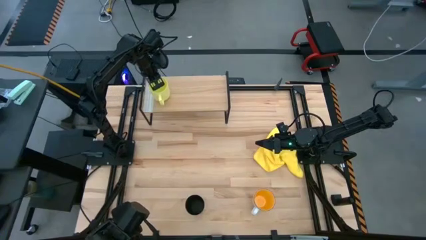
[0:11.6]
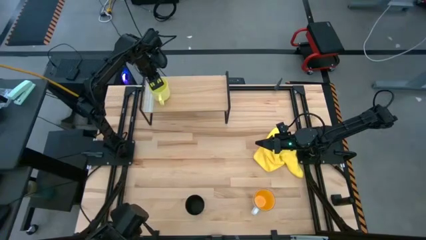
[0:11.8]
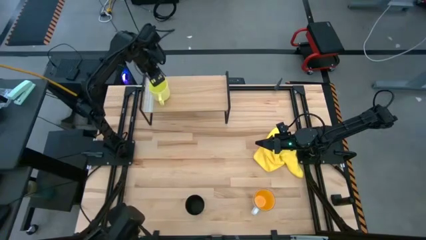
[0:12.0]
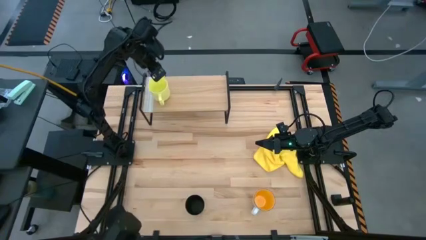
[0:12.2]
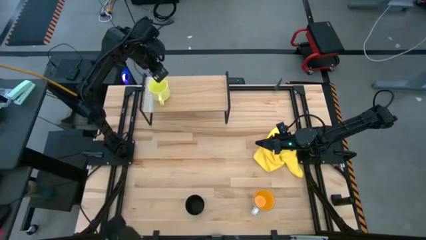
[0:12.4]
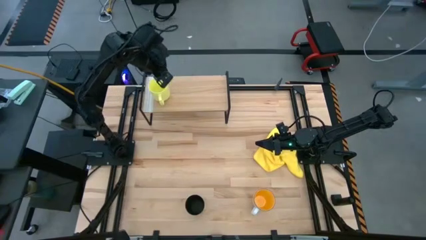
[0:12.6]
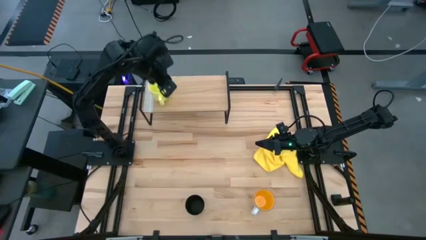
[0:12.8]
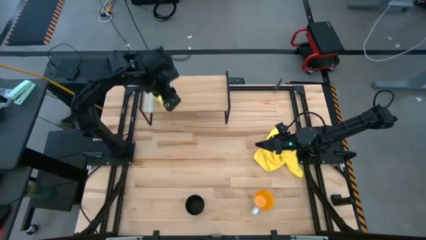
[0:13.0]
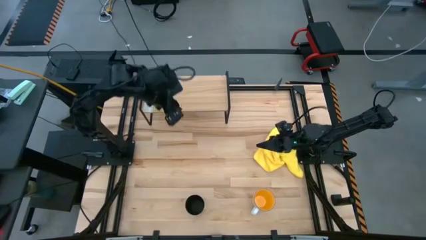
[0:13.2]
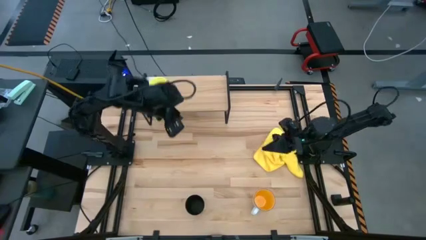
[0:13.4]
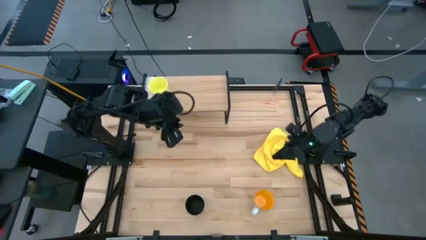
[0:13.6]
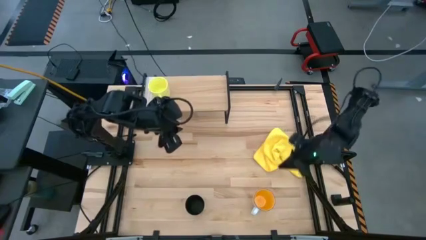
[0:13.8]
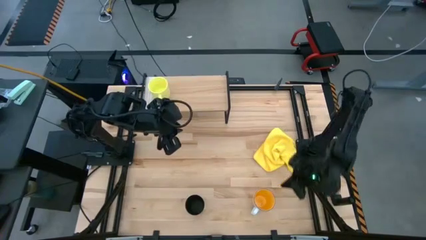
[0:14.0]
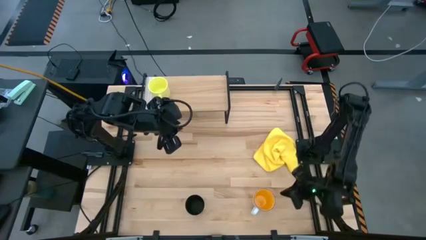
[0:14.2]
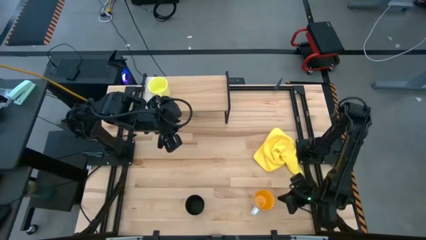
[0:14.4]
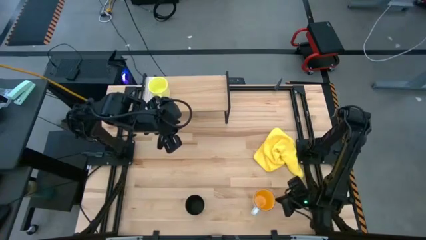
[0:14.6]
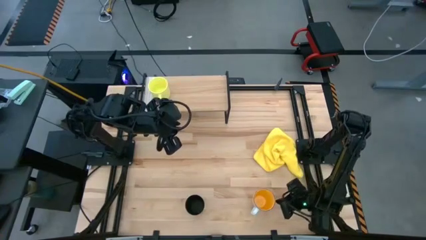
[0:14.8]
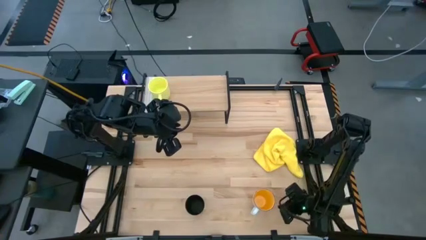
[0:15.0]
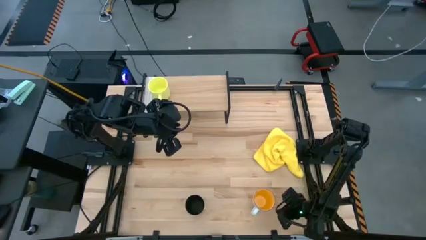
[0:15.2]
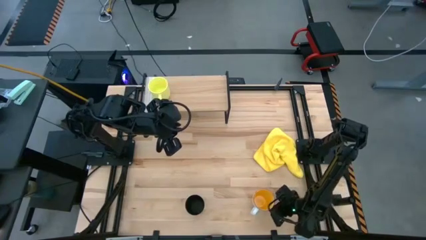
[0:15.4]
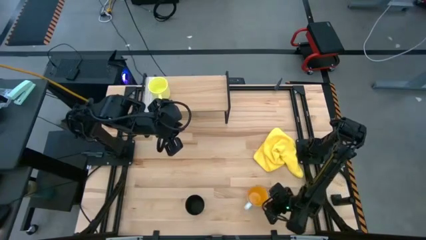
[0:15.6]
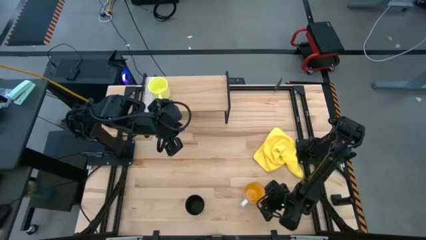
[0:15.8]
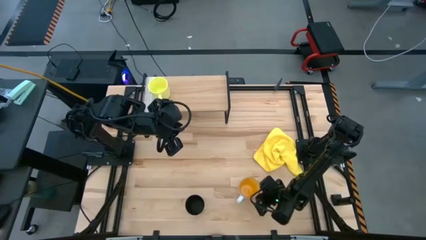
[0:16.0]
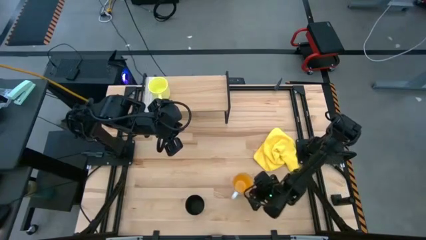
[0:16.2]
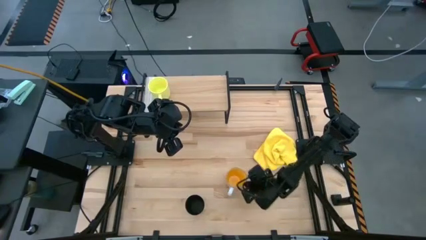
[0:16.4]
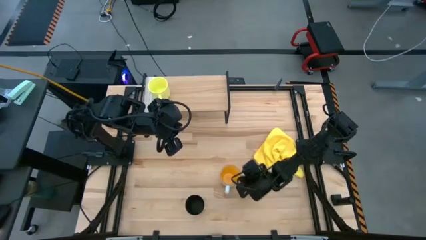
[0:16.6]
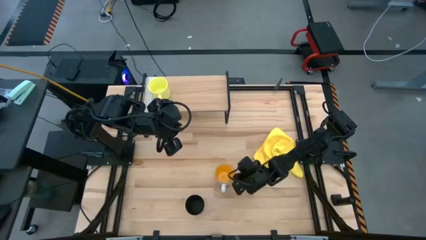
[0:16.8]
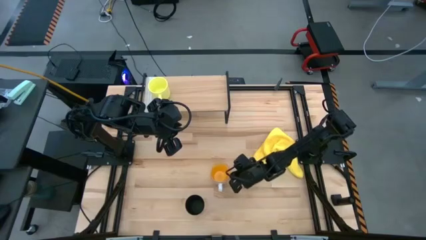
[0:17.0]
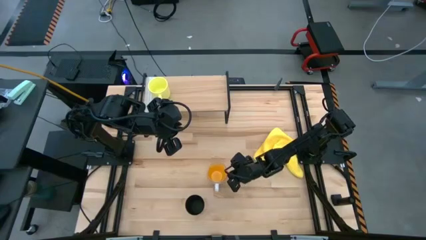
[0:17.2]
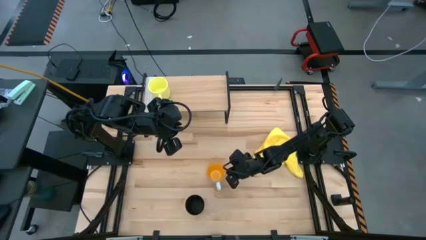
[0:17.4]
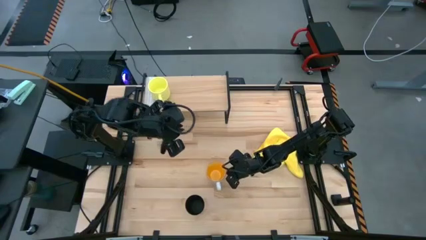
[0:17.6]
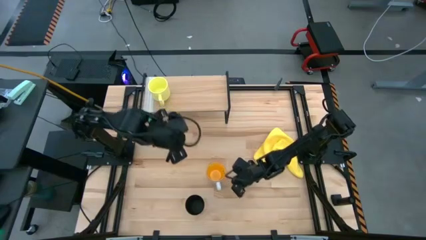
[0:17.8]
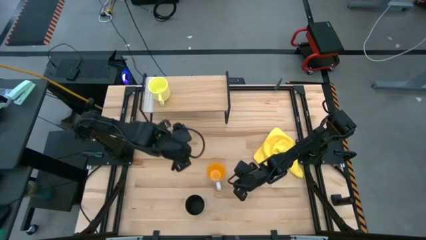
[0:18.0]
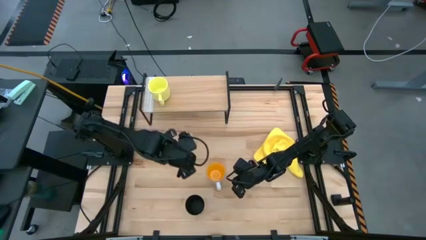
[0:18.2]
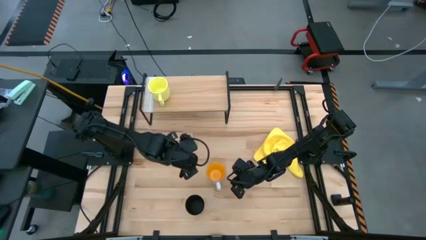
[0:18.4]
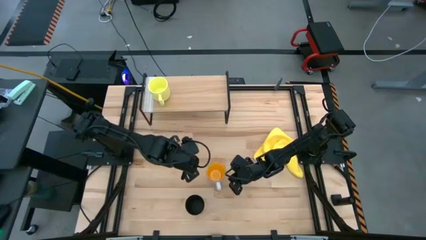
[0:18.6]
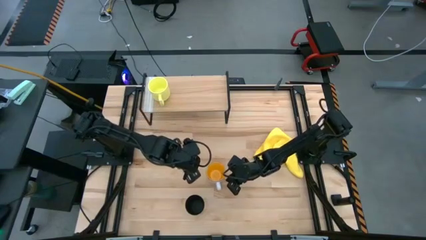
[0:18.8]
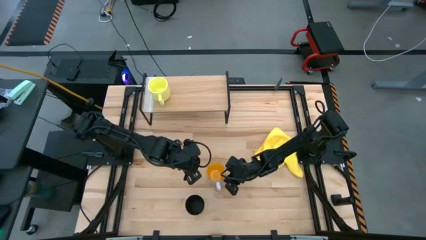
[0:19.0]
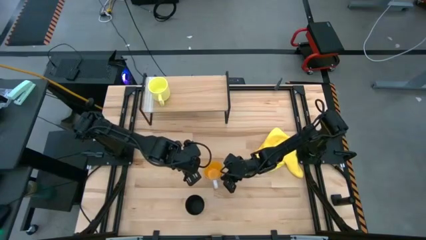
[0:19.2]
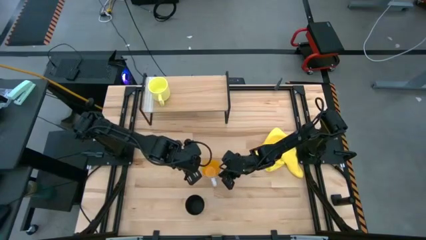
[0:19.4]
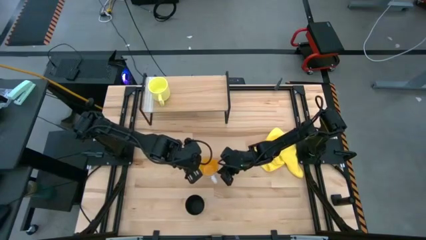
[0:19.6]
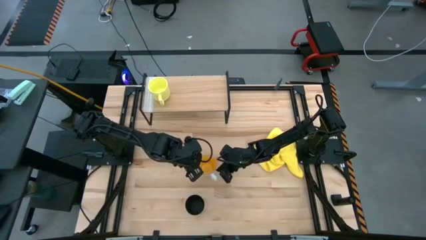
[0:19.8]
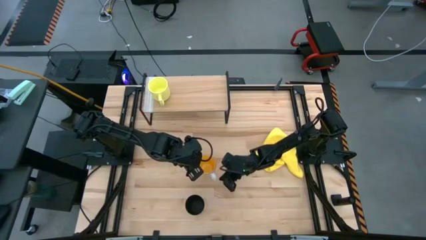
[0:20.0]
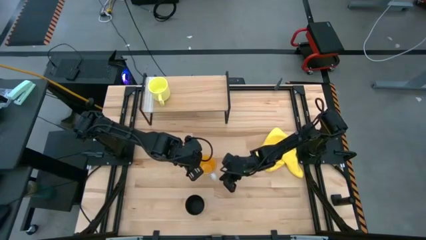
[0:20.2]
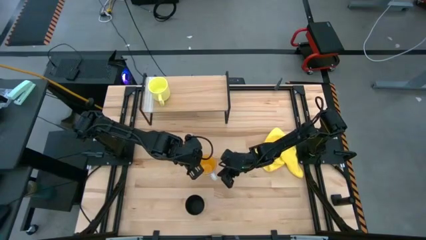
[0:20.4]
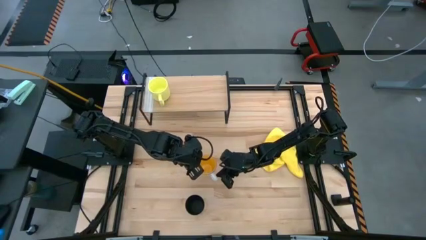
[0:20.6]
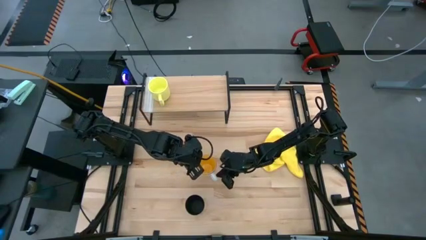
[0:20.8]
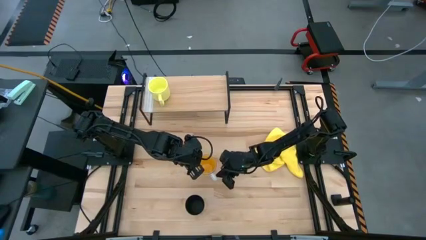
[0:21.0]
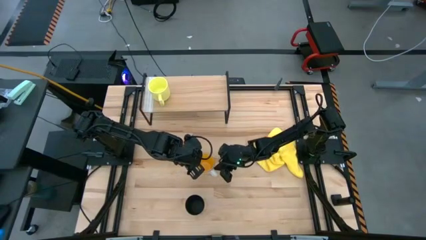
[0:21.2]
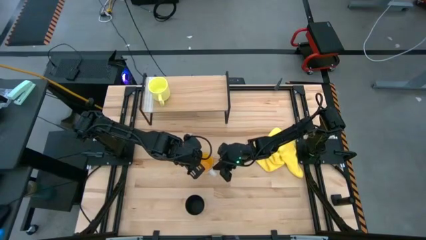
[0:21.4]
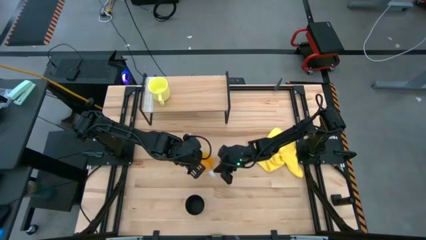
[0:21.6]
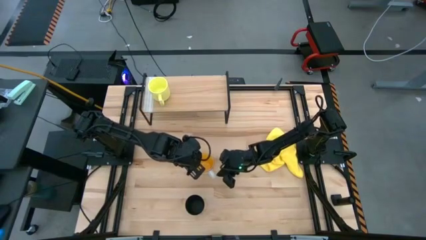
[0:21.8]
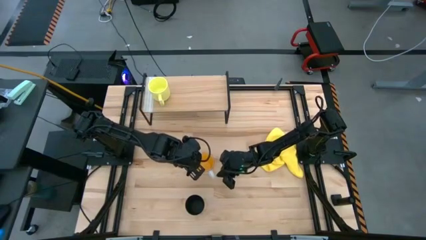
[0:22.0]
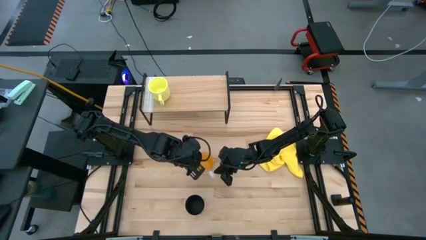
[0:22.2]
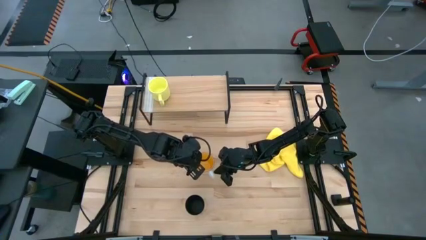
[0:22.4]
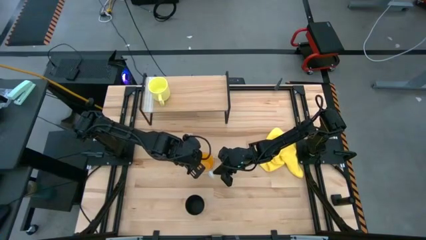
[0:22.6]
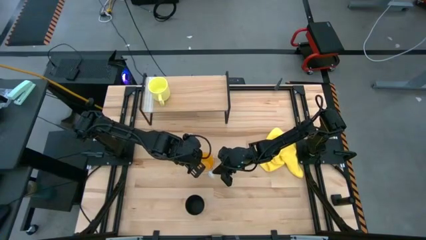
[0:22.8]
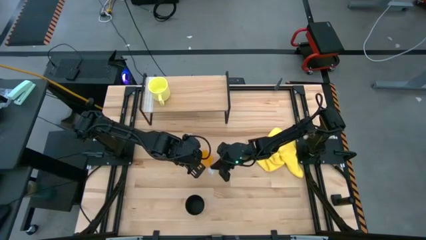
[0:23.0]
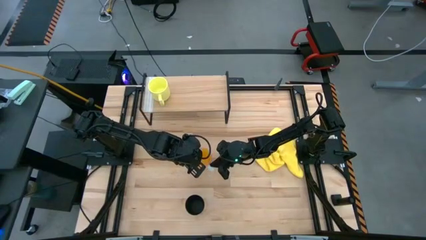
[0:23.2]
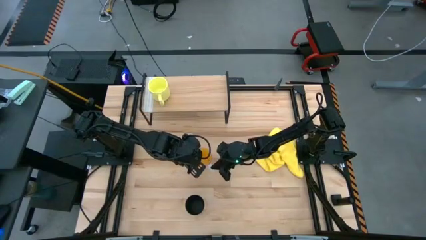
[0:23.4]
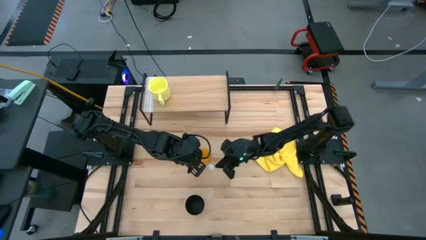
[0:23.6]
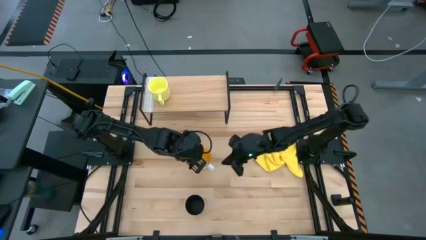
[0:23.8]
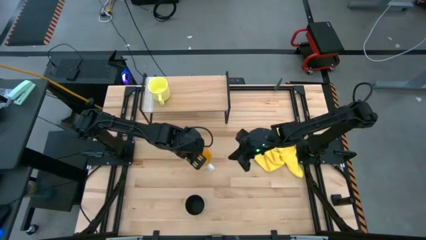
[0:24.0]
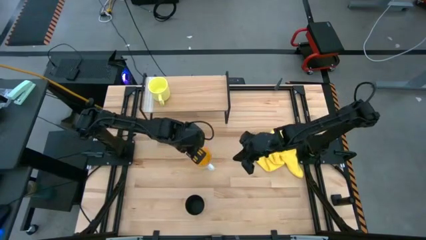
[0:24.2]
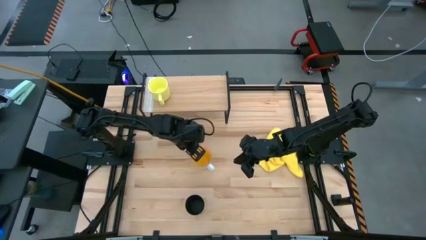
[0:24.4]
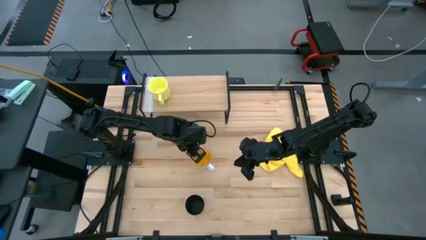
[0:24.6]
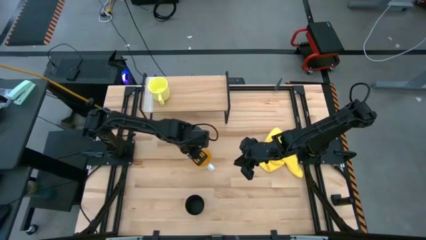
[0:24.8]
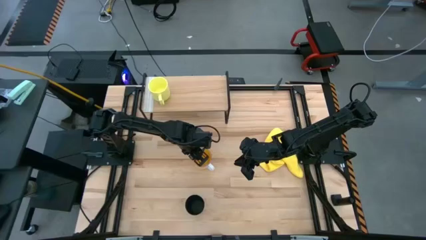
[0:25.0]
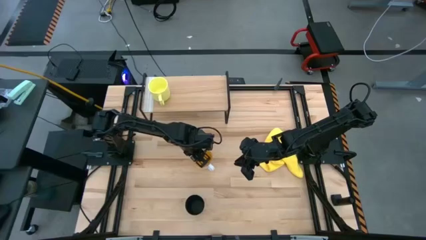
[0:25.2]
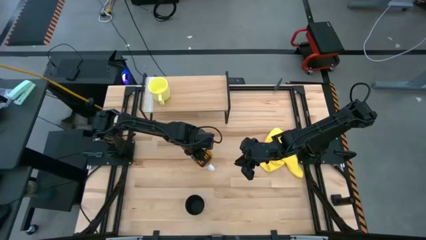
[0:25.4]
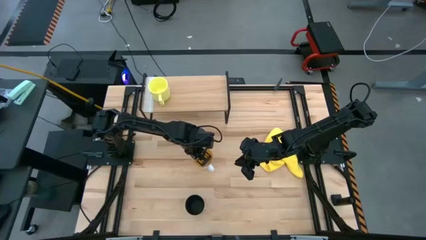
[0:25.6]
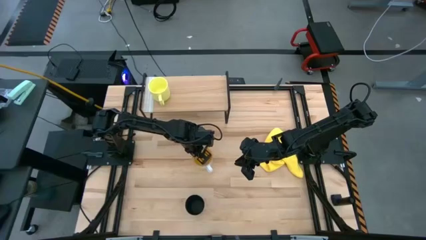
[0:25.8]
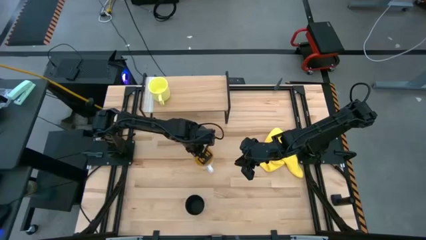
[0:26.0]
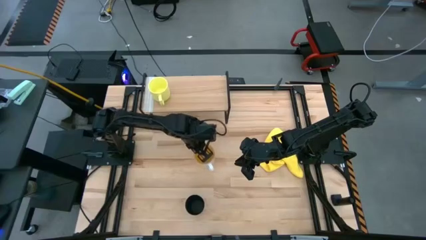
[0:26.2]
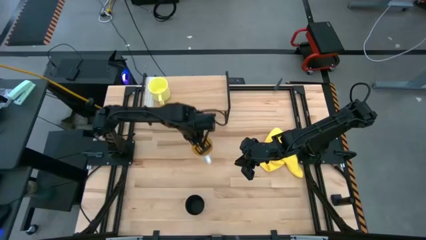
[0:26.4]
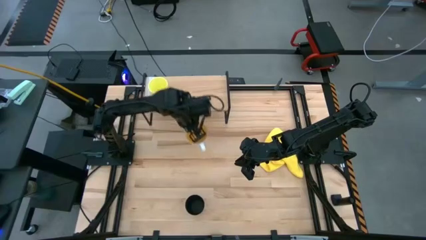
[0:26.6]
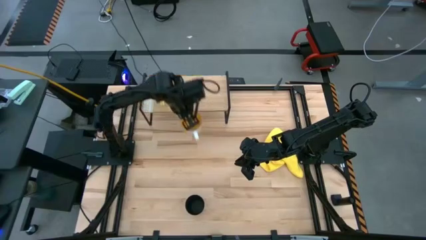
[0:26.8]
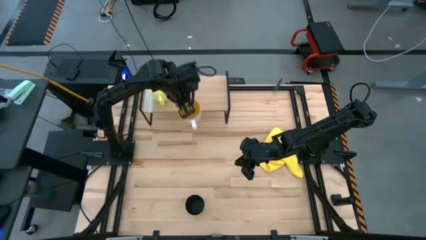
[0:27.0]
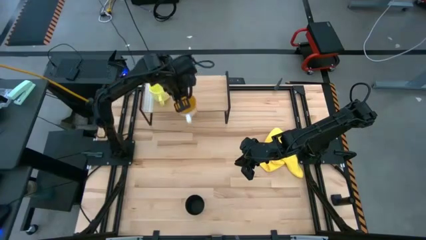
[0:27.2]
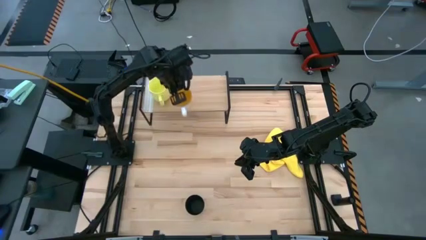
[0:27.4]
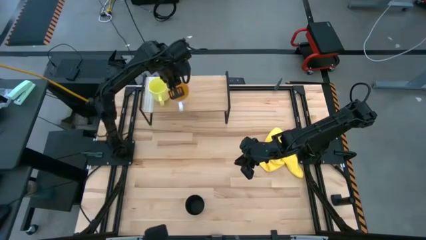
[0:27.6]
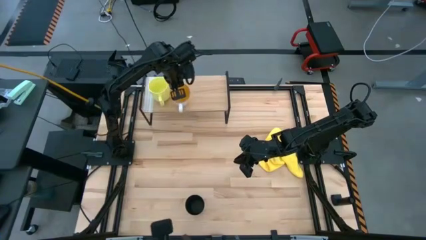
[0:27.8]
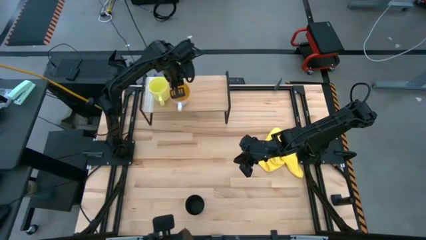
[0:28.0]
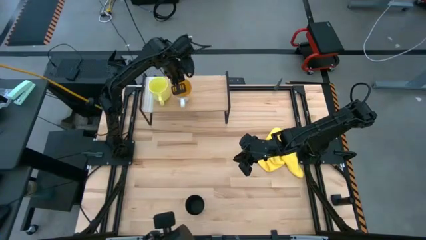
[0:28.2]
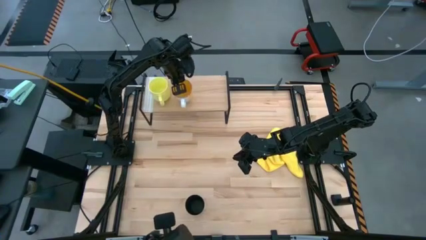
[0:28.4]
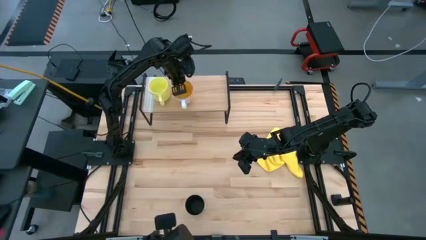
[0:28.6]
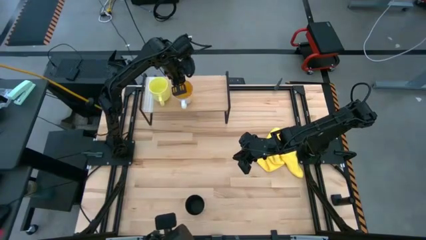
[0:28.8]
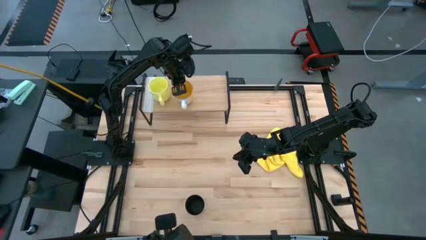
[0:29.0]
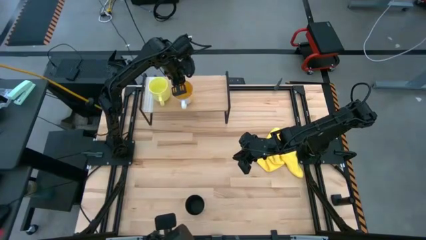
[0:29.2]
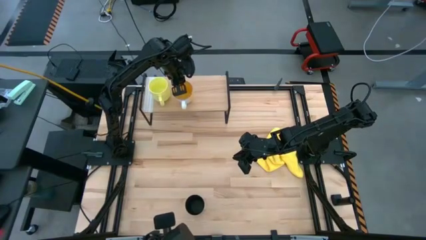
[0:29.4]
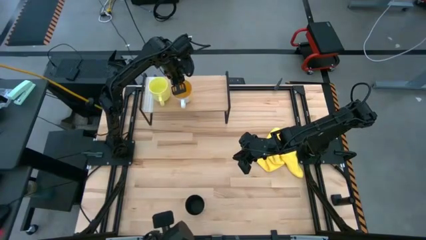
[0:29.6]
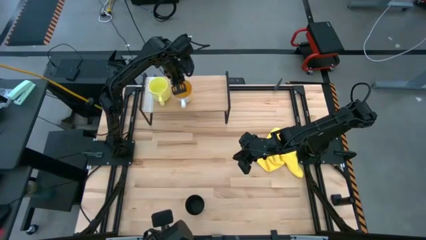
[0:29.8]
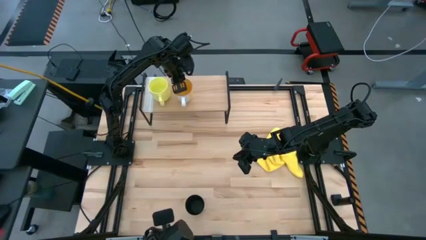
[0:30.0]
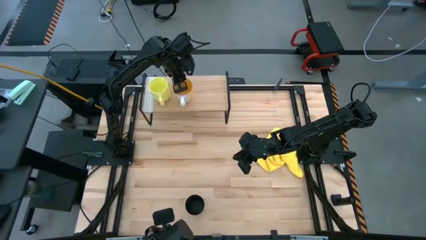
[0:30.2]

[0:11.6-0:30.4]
Task: Stack small to large cups/mugs on shelf
Put the orange mug on the shelf
